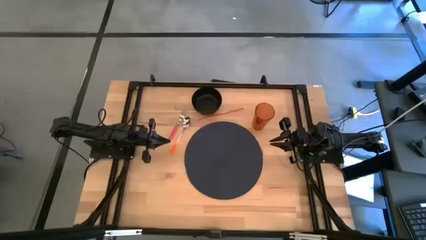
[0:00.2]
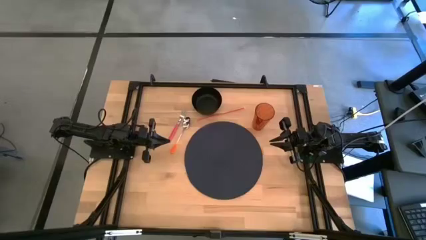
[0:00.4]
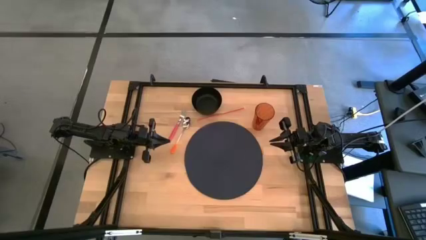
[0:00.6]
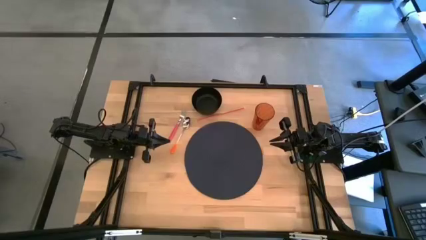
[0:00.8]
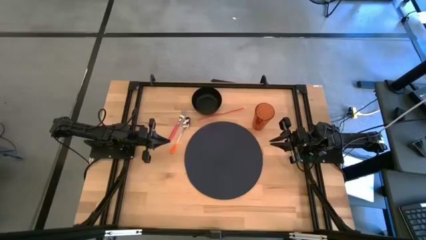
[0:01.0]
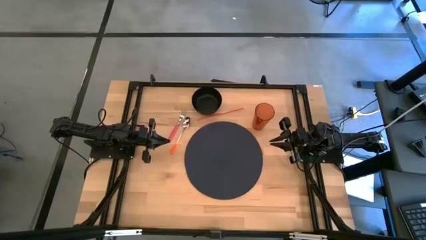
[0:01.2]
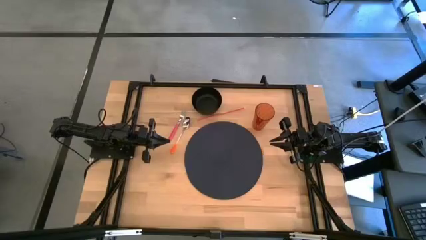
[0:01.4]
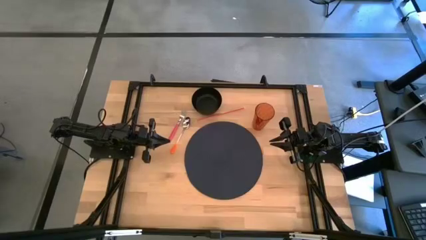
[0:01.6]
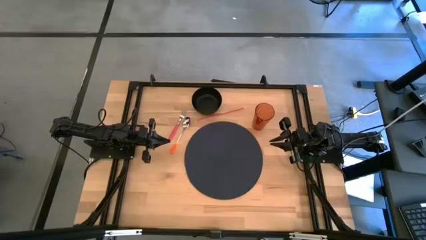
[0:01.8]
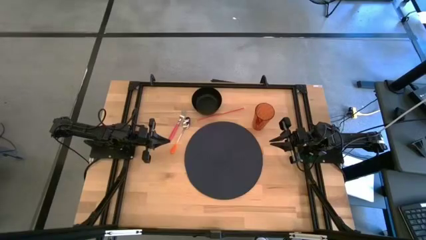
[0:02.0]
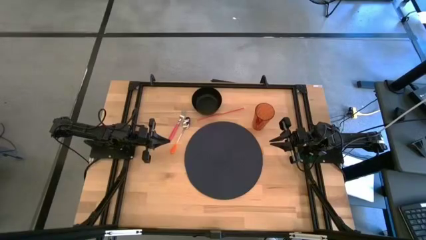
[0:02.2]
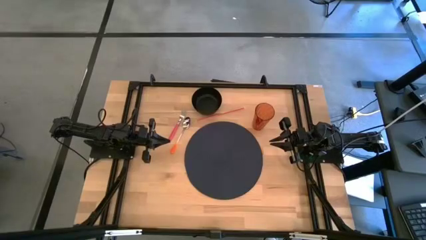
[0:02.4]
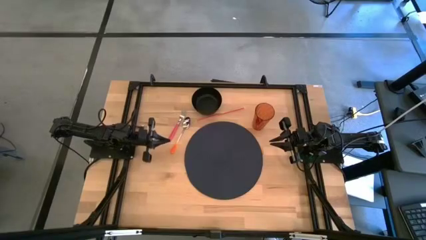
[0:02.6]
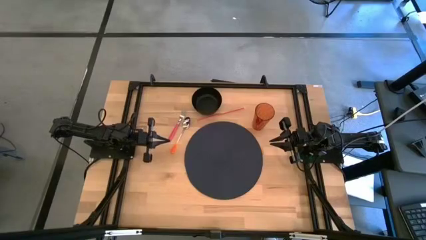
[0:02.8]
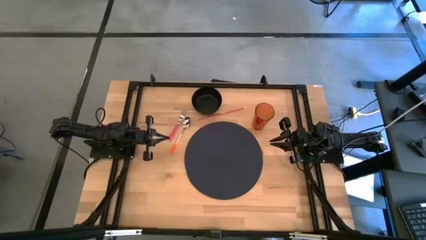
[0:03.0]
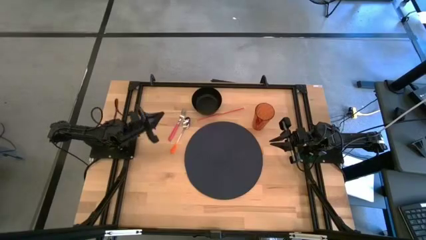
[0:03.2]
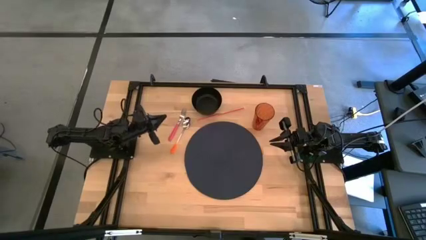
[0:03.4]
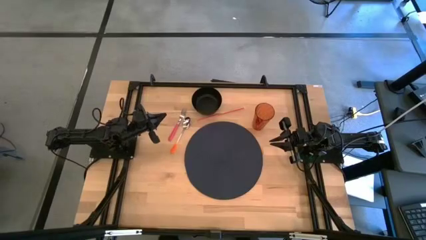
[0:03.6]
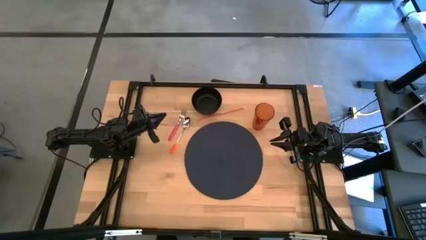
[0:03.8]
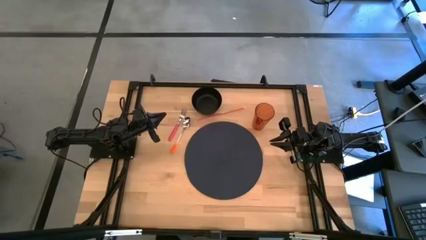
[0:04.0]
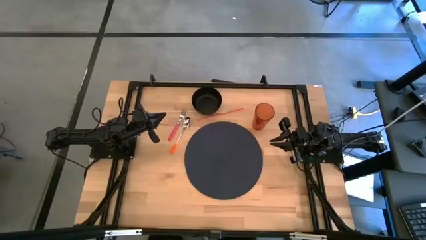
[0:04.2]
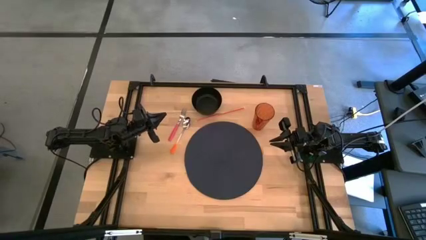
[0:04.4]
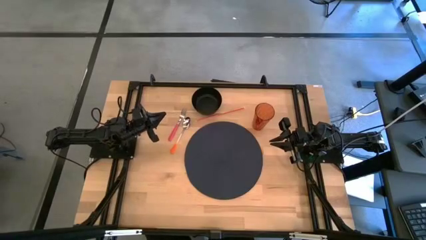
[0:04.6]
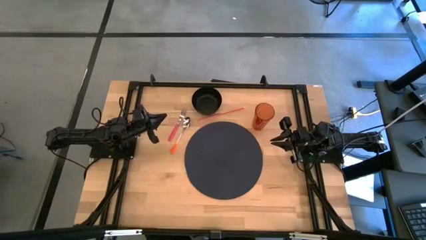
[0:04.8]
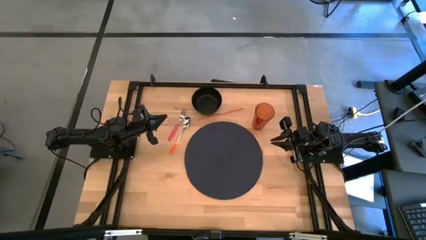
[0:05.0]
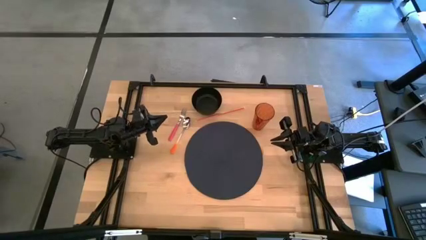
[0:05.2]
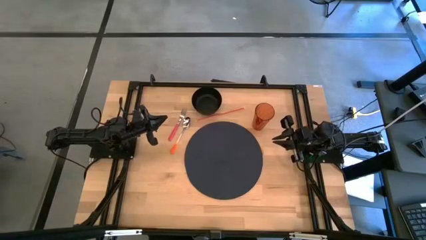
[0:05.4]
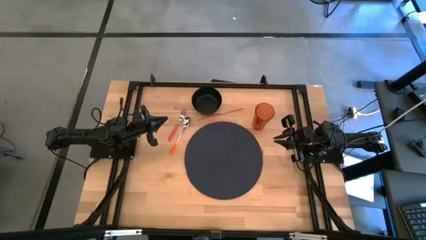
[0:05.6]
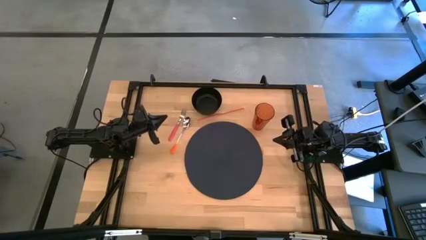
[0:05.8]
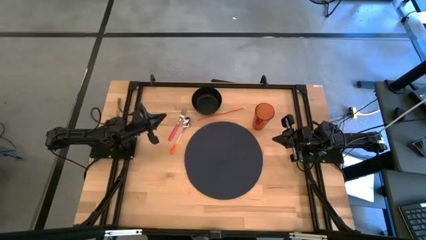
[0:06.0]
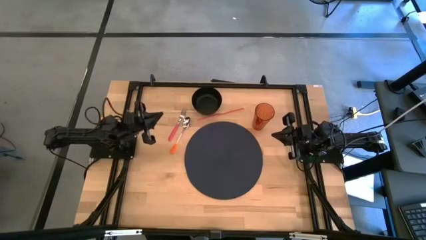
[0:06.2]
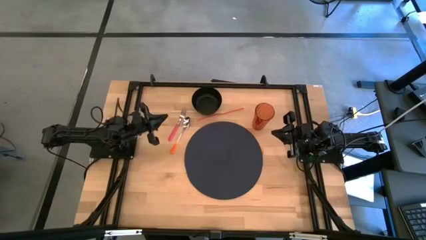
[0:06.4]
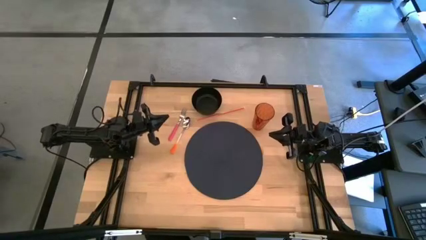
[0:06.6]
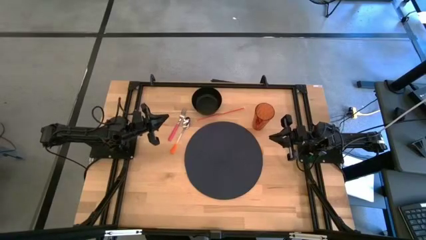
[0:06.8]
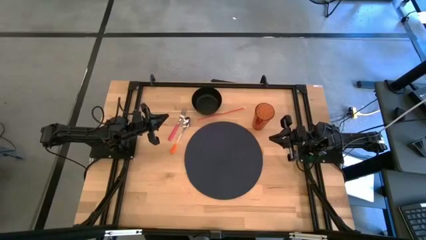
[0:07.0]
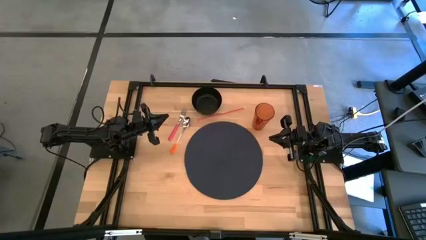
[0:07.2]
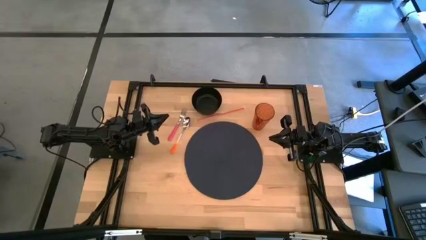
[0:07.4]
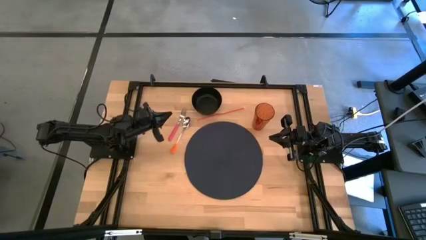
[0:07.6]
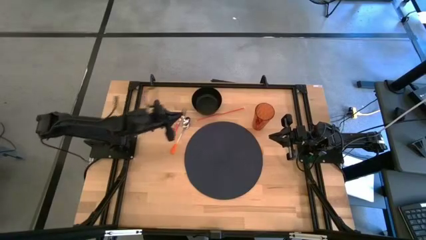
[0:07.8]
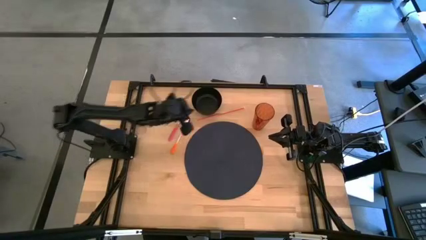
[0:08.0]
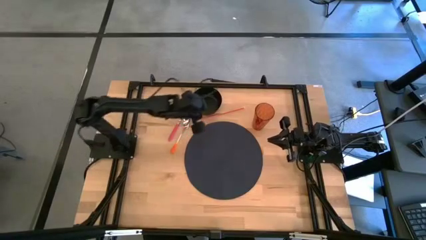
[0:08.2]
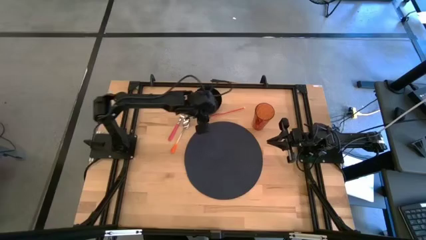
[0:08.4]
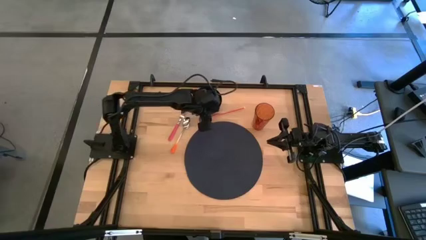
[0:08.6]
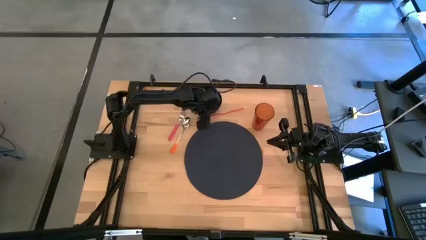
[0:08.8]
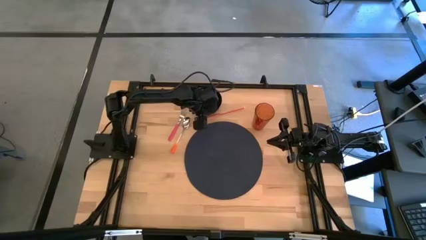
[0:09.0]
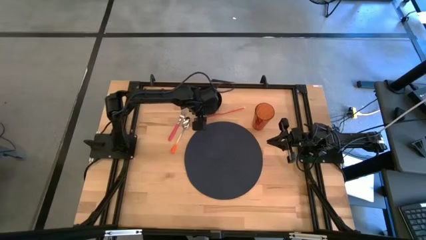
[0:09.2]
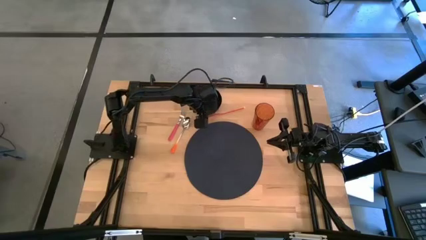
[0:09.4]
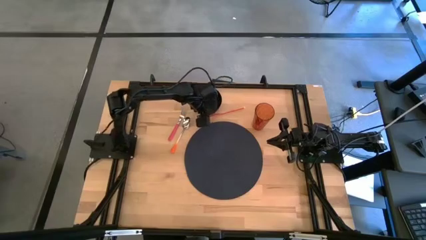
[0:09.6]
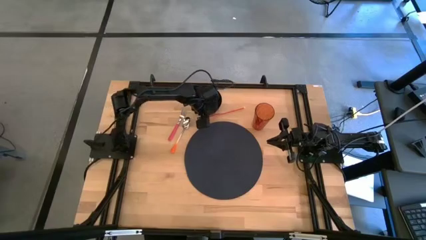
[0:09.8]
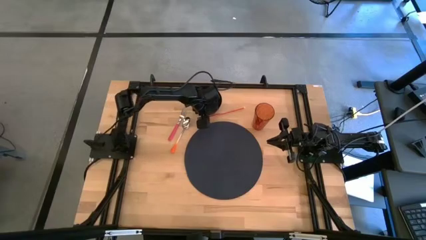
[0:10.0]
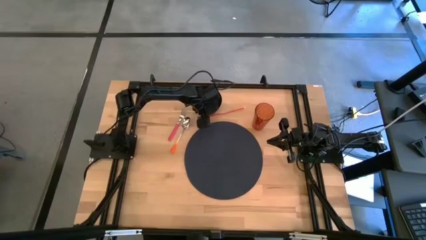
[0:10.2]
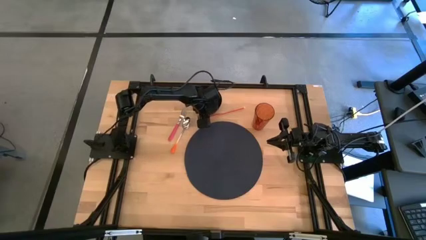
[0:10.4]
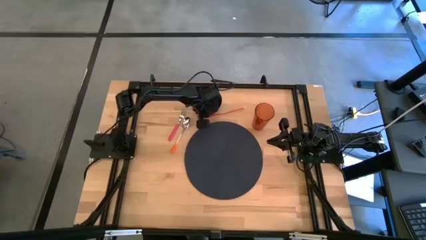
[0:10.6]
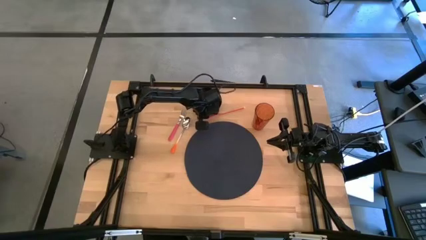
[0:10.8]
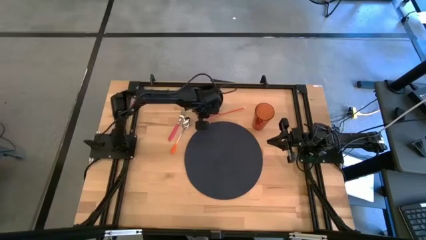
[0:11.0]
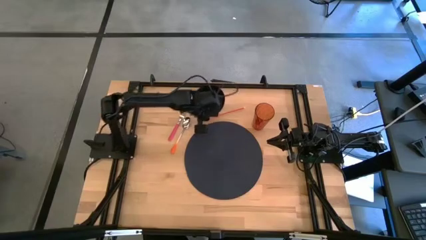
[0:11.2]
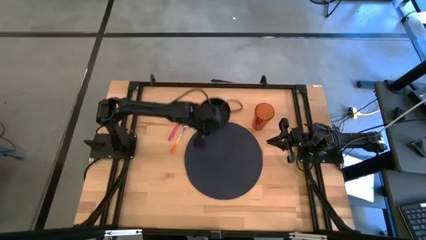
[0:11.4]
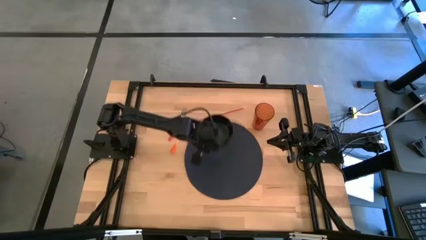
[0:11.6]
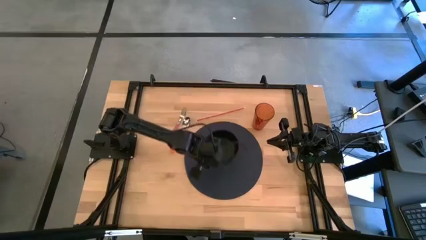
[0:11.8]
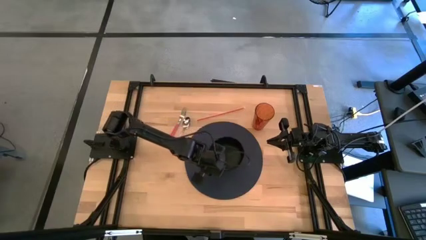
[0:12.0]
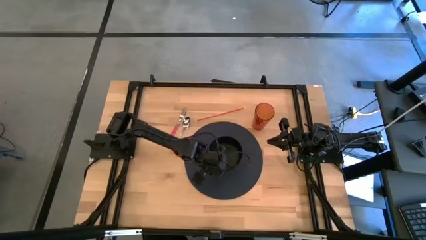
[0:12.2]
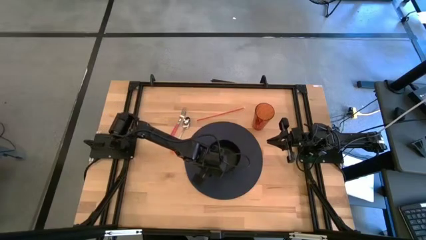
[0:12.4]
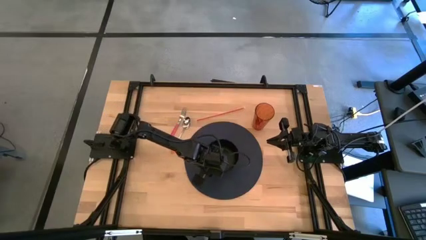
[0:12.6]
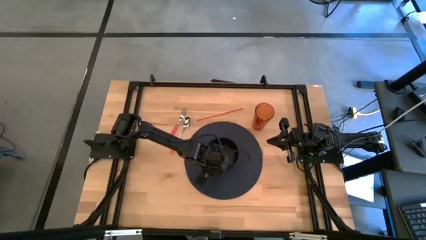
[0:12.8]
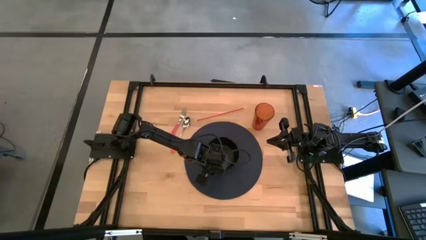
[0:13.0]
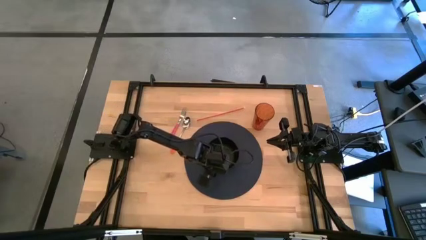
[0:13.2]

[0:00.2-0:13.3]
Task: Pick & Place Utensil
Put the black bowl on the center of the blue placemat
